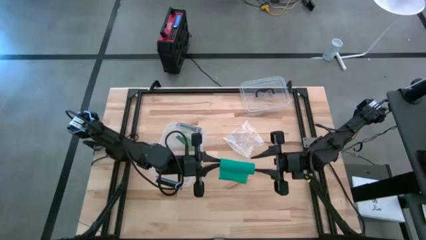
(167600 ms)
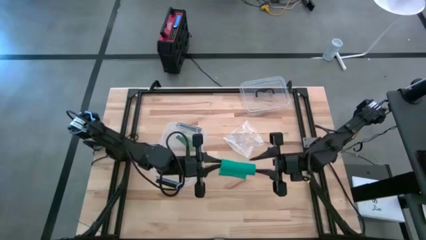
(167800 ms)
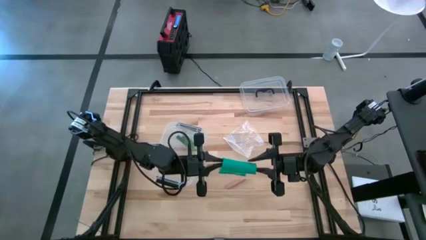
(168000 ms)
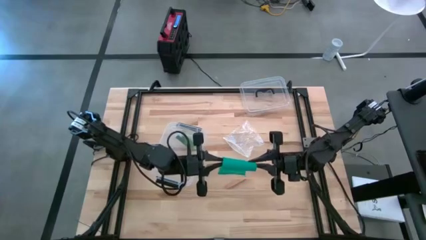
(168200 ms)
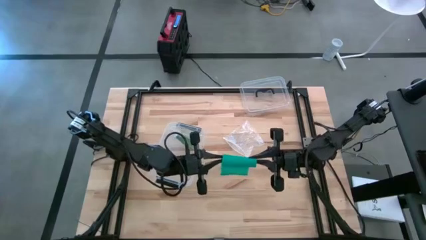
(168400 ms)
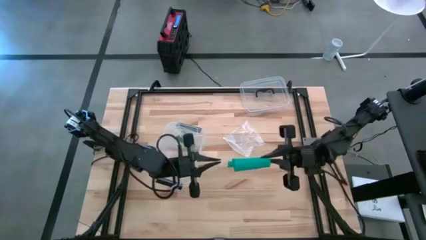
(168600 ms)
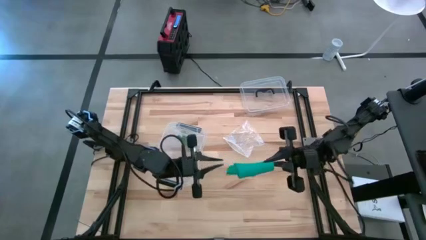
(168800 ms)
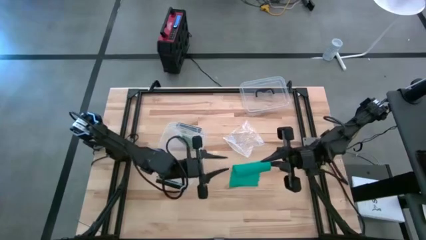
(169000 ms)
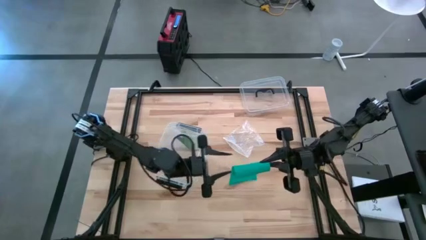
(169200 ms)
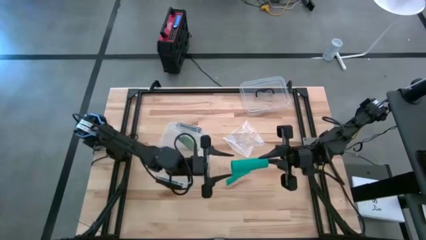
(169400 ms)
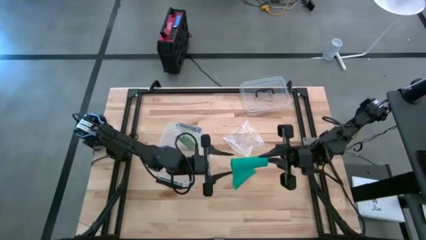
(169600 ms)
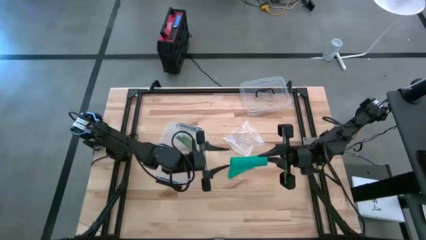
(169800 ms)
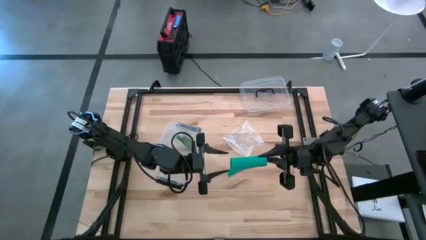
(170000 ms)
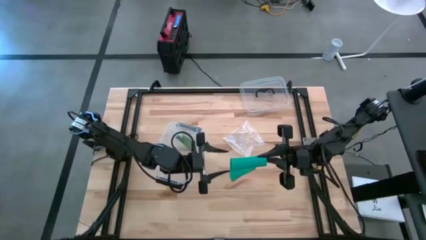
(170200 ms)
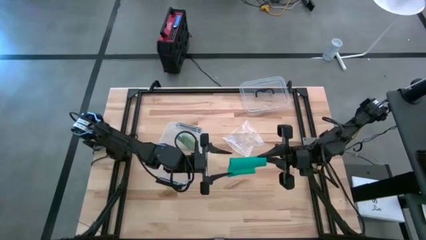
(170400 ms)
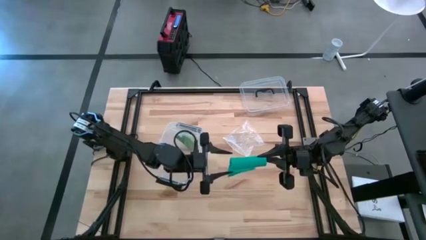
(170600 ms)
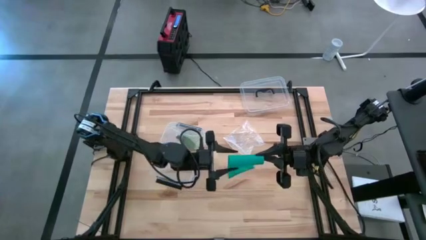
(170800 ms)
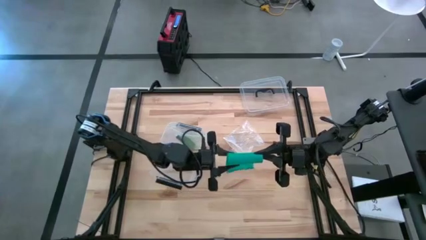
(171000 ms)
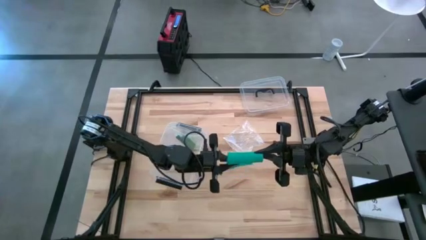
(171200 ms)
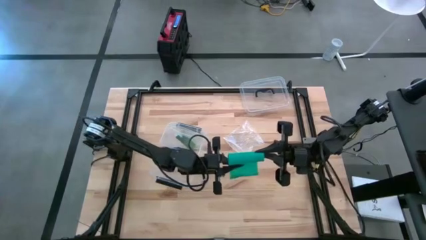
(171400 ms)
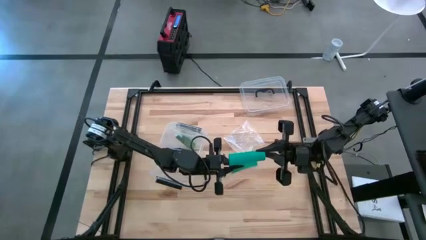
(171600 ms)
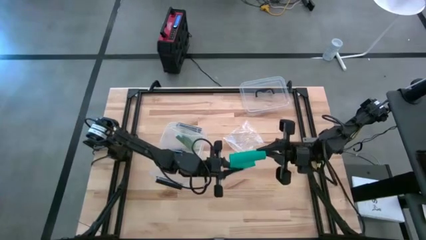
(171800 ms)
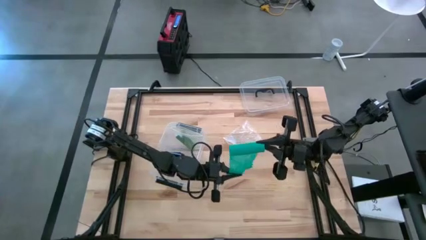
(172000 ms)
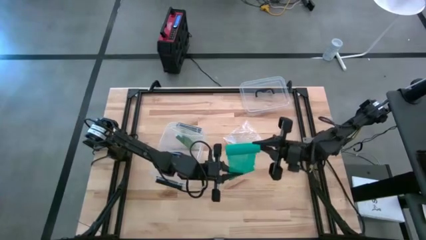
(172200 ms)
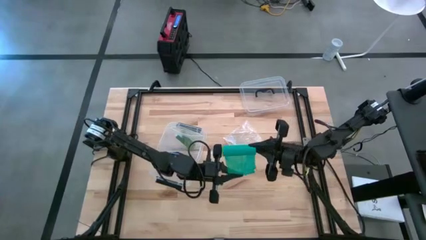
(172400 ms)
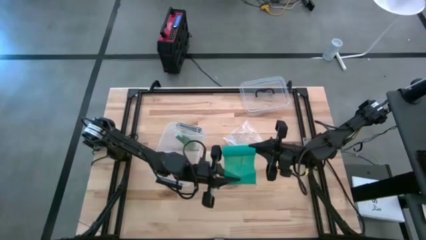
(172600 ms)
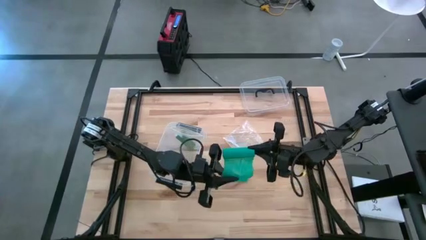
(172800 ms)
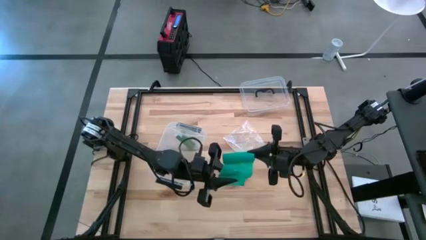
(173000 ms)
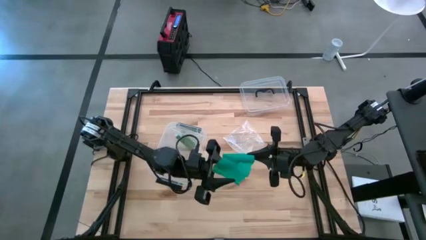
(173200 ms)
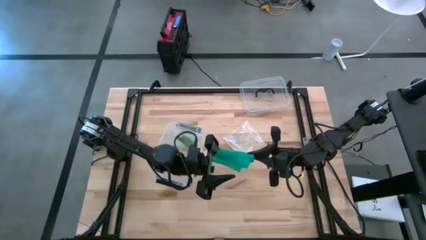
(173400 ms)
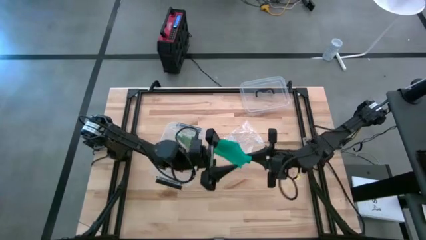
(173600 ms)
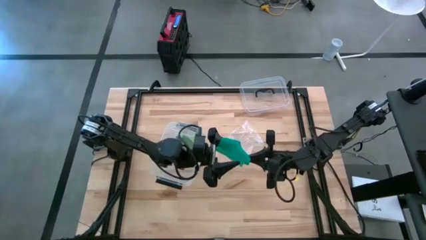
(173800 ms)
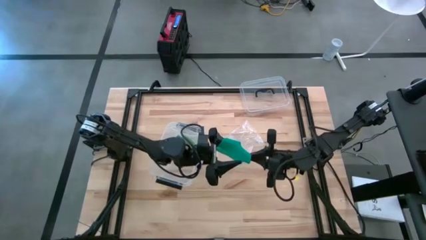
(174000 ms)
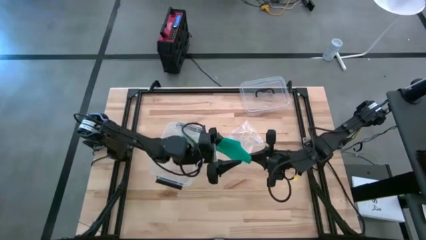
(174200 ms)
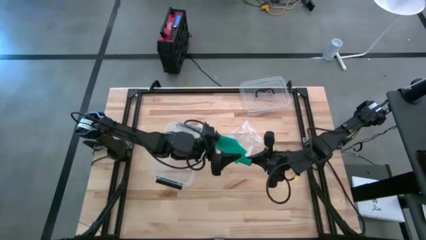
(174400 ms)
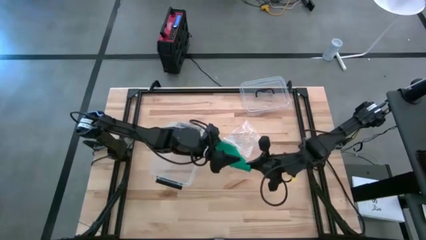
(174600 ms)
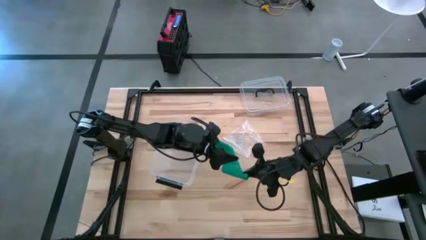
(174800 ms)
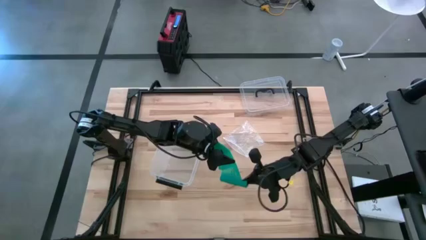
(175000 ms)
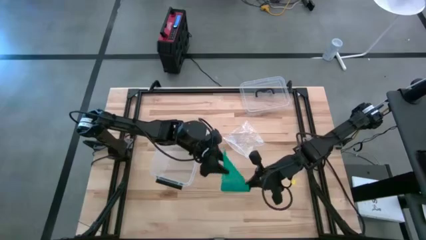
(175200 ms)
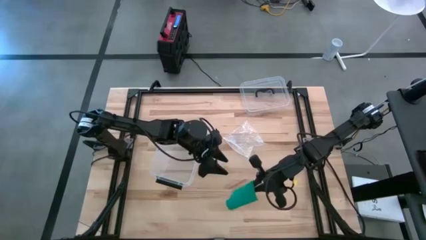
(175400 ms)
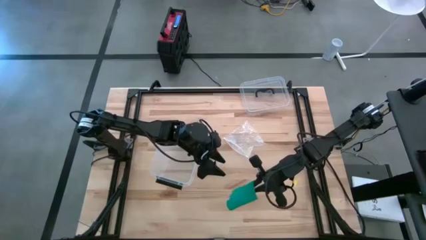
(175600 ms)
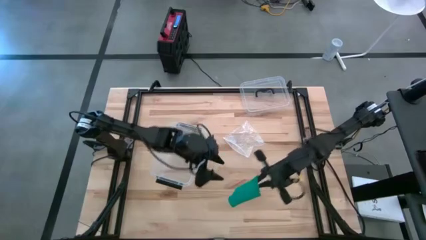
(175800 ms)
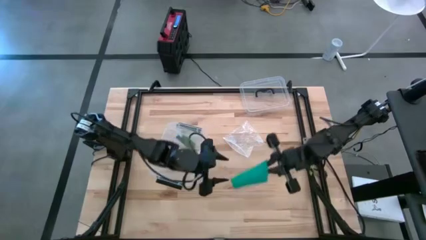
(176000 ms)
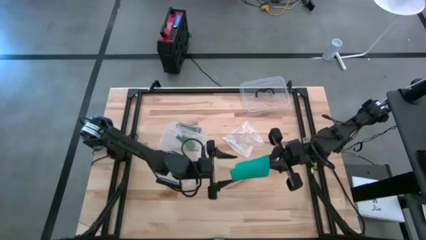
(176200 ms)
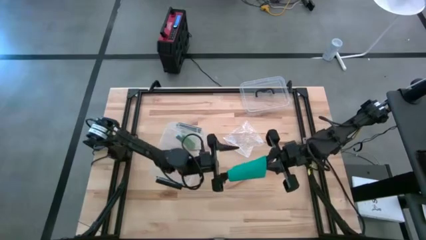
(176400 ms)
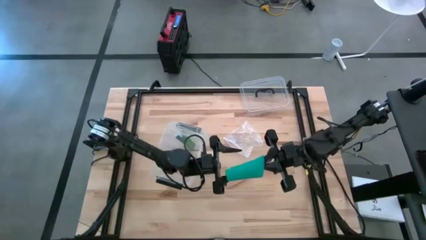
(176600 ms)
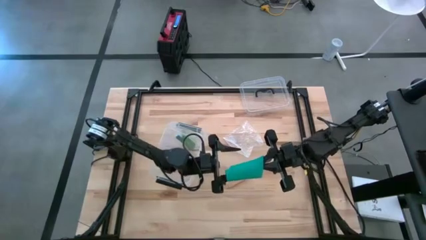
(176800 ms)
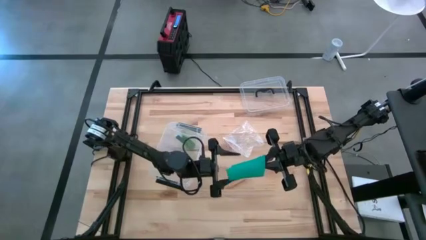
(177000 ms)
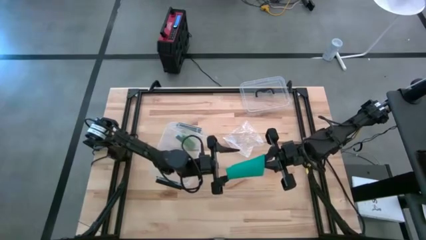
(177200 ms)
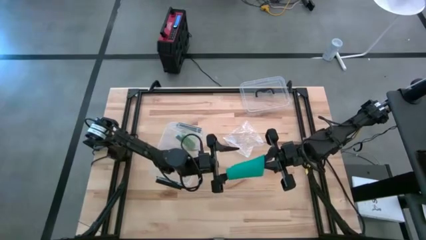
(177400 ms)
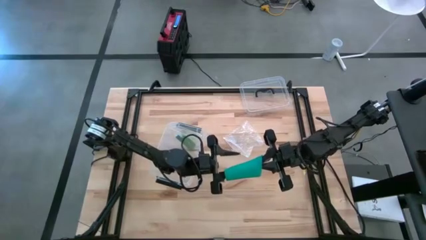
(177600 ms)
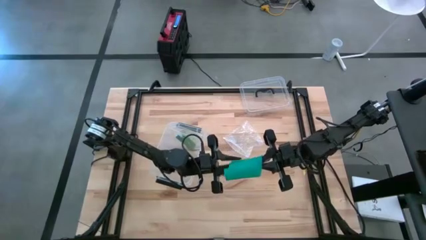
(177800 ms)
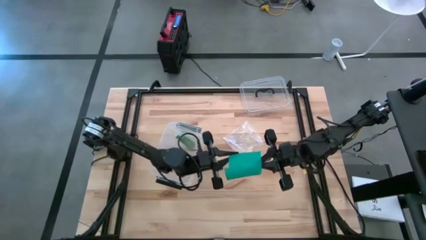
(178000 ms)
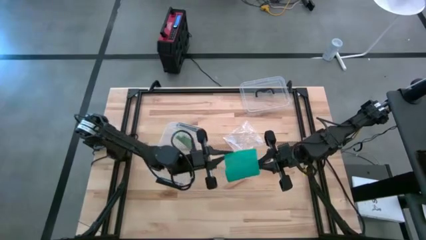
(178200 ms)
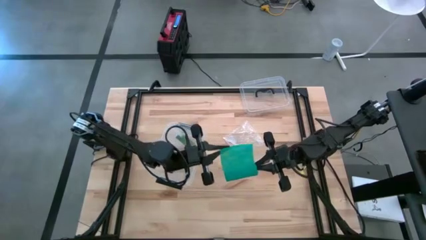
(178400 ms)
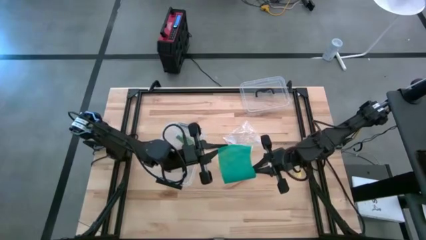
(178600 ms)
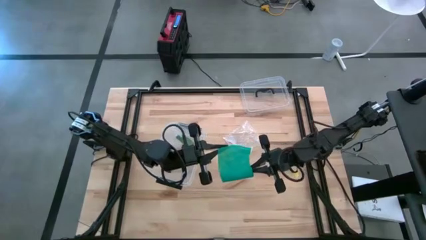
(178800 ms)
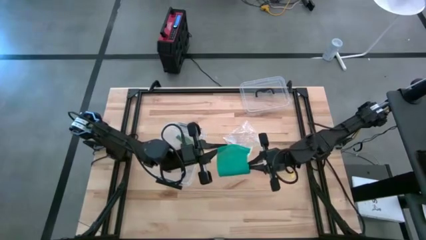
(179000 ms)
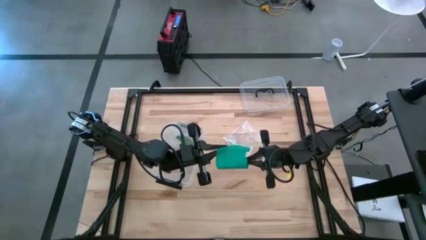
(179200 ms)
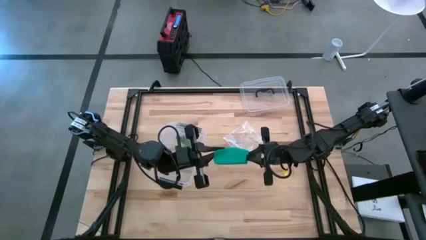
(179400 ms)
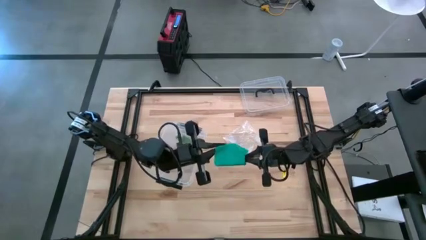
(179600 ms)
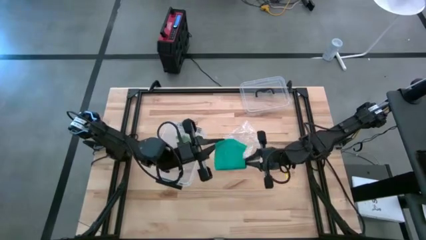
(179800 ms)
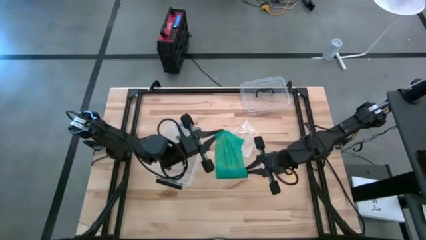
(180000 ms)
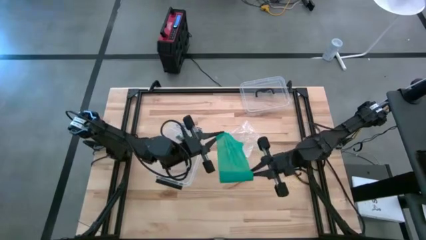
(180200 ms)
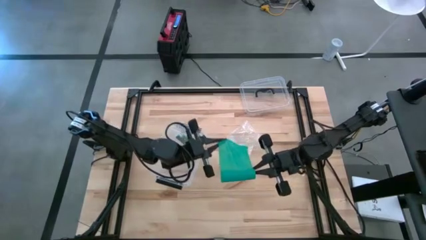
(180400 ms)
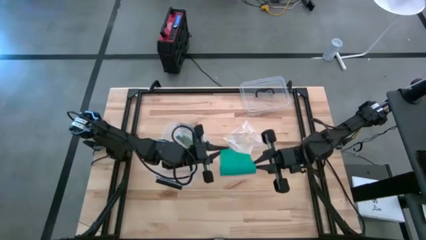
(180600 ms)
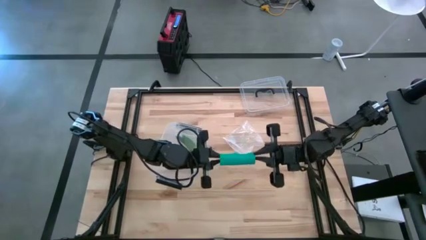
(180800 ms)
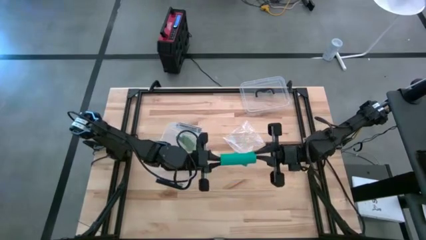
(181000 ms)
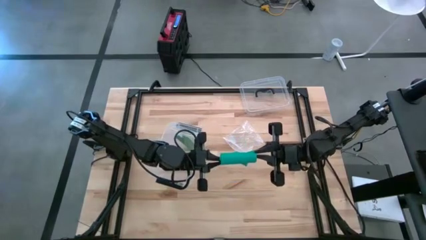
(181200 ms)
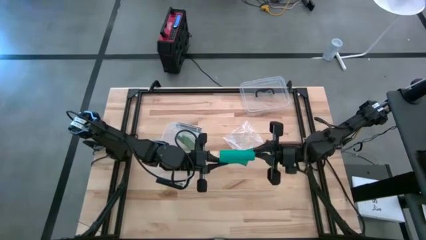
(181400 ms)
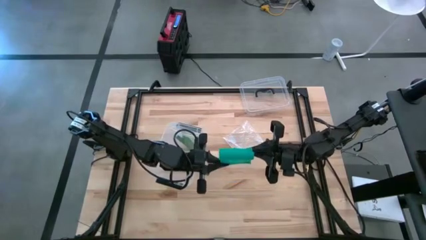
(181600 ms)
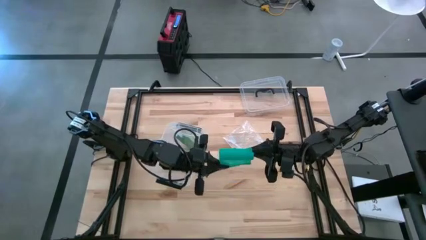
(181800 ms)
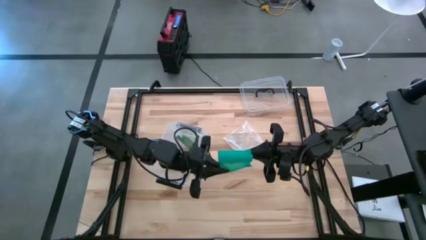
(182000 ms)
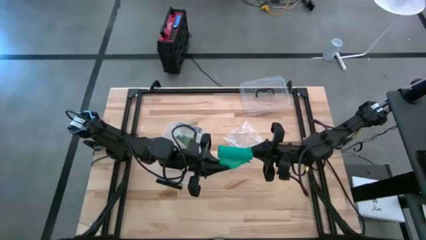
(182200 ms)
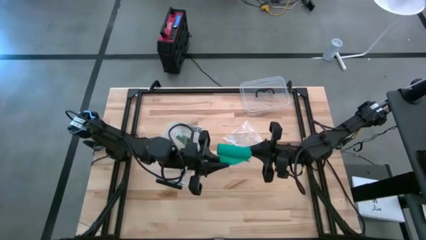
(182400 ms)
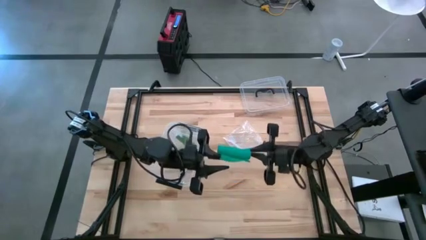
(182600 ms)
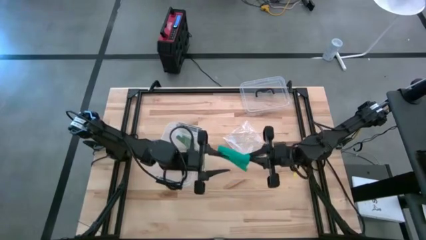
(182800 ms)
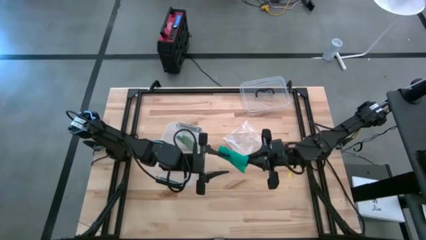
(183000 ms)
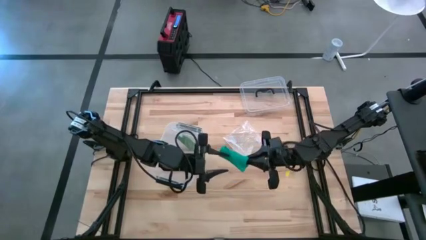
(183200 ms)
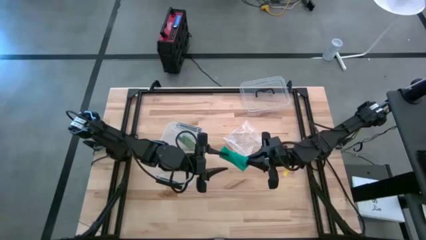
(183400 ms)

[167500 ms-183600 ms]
Task: Roll bandage
Roll the blue bandage
